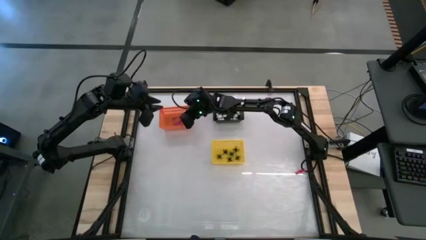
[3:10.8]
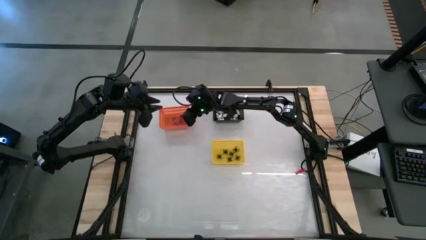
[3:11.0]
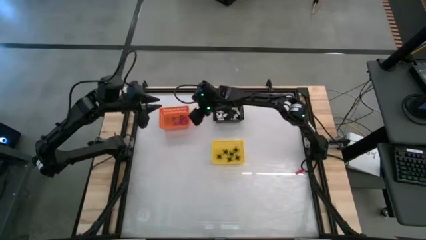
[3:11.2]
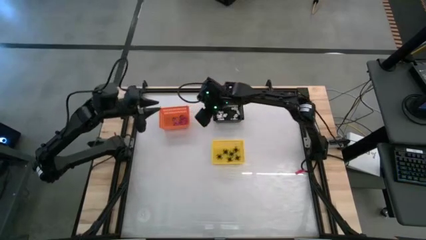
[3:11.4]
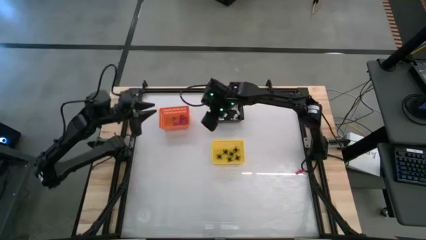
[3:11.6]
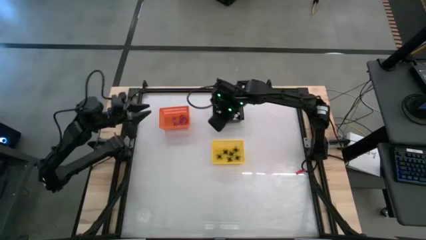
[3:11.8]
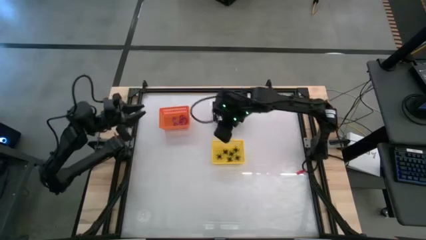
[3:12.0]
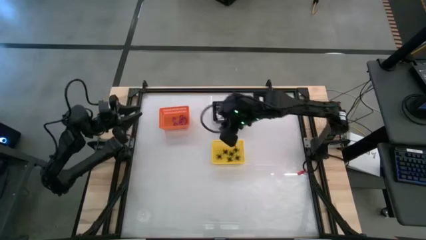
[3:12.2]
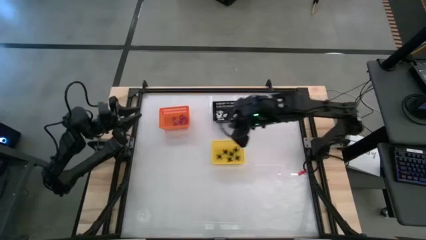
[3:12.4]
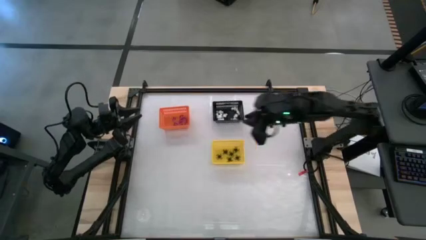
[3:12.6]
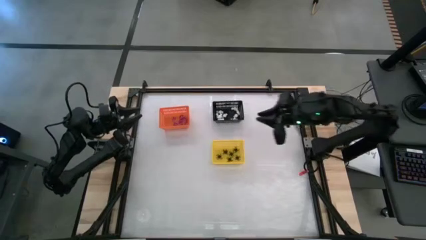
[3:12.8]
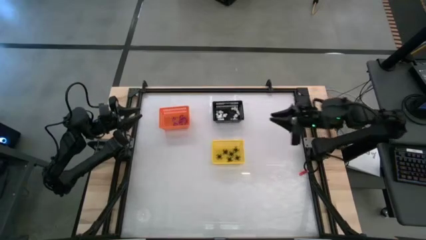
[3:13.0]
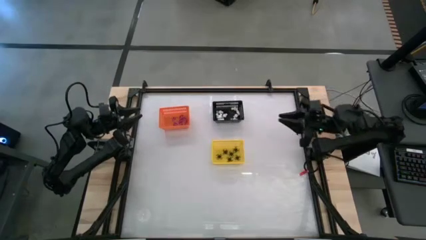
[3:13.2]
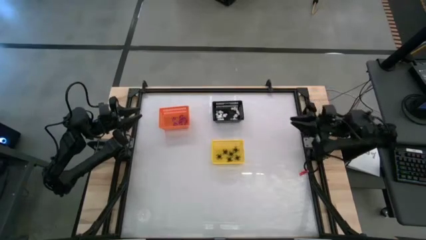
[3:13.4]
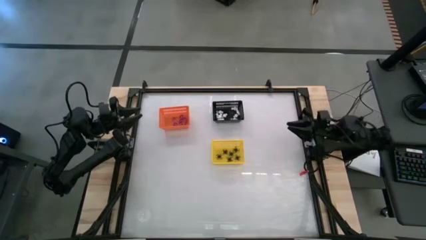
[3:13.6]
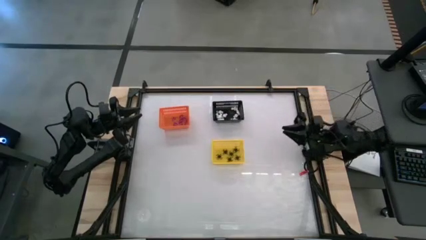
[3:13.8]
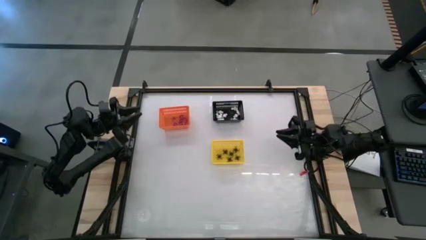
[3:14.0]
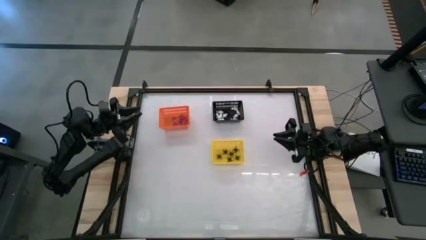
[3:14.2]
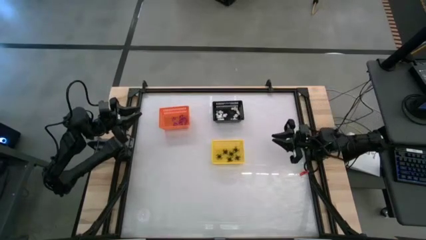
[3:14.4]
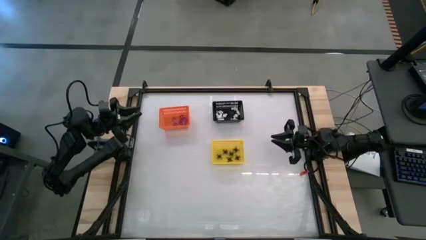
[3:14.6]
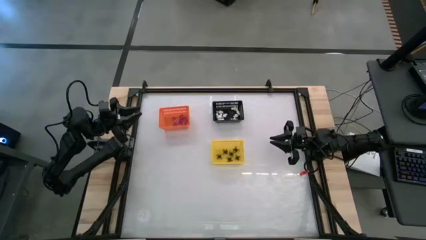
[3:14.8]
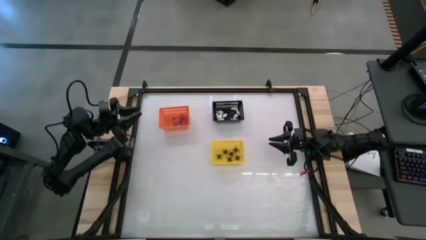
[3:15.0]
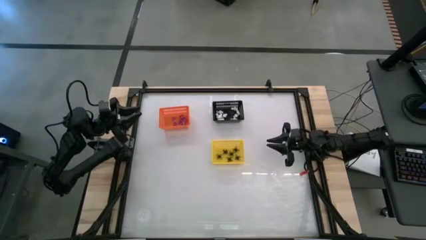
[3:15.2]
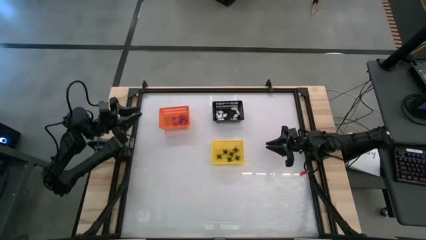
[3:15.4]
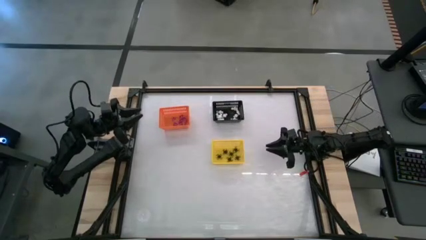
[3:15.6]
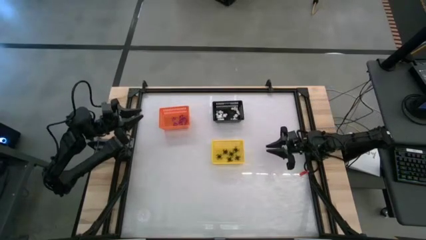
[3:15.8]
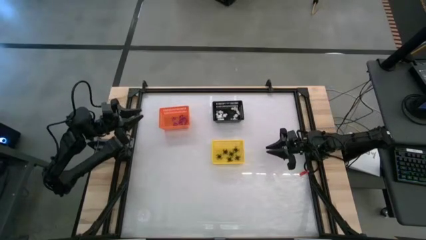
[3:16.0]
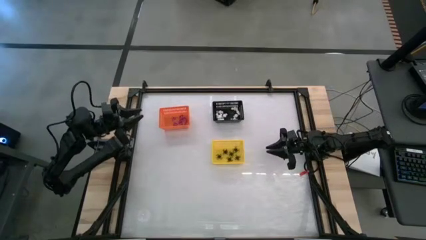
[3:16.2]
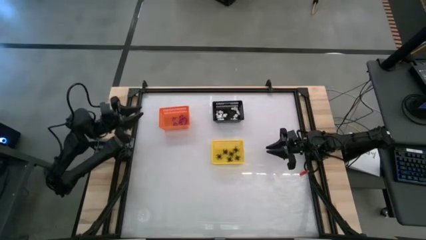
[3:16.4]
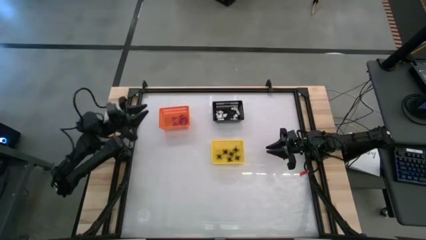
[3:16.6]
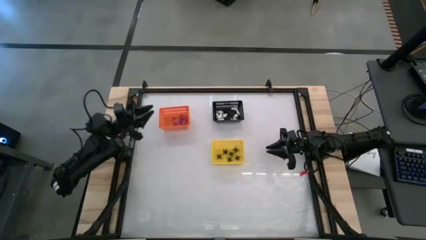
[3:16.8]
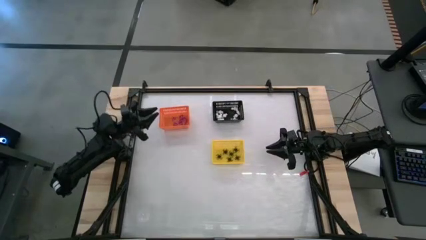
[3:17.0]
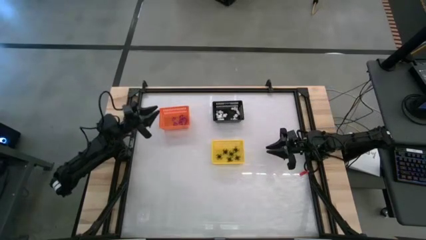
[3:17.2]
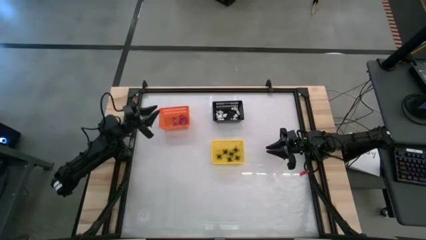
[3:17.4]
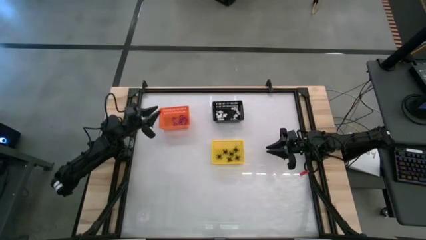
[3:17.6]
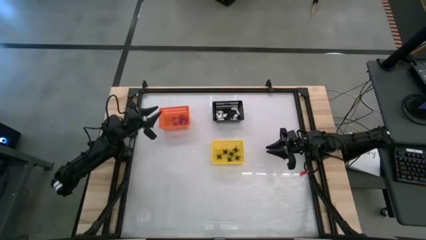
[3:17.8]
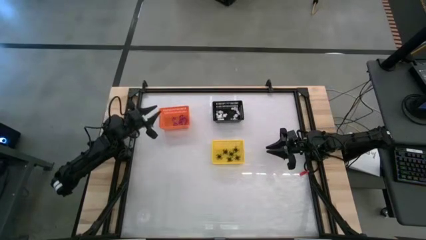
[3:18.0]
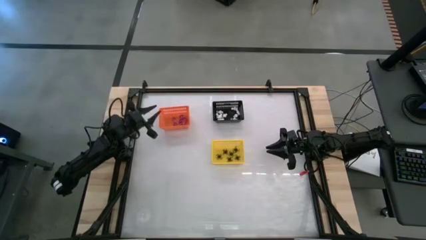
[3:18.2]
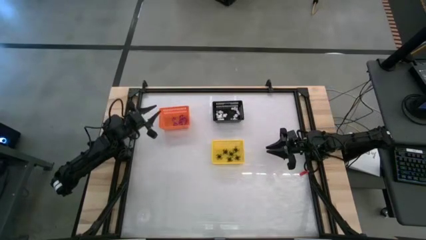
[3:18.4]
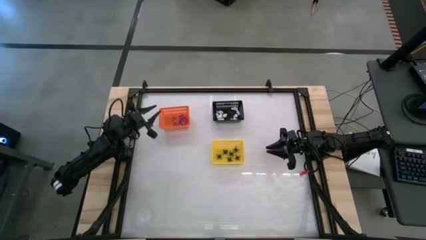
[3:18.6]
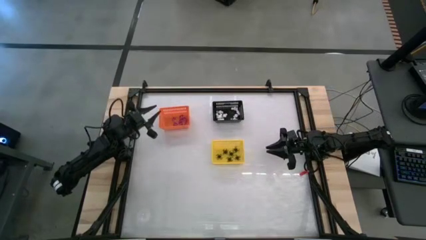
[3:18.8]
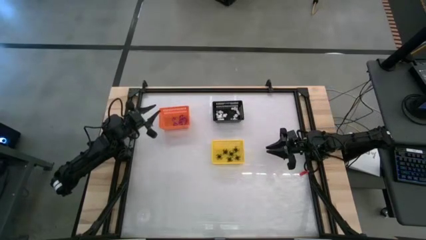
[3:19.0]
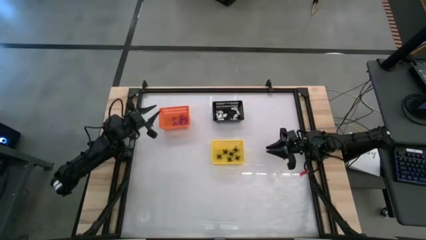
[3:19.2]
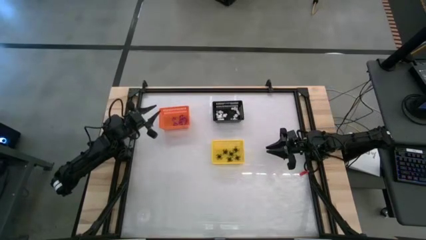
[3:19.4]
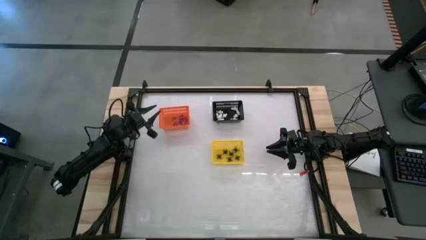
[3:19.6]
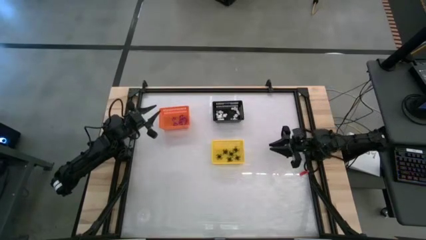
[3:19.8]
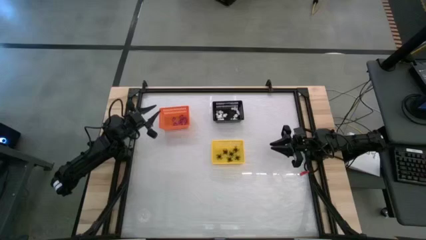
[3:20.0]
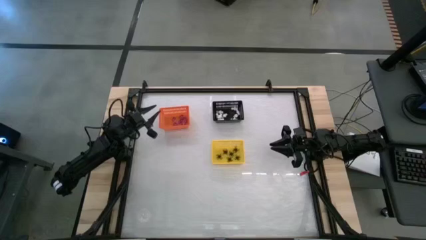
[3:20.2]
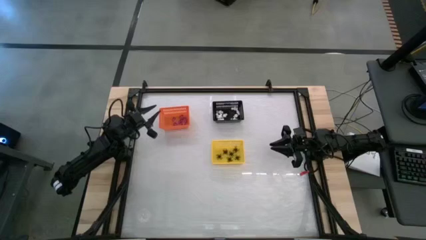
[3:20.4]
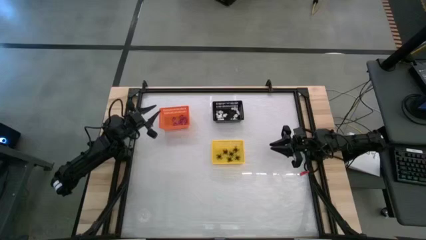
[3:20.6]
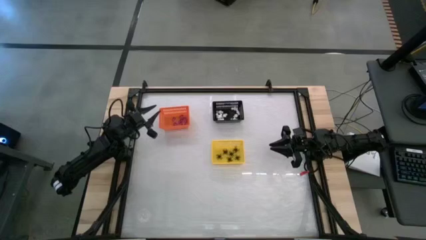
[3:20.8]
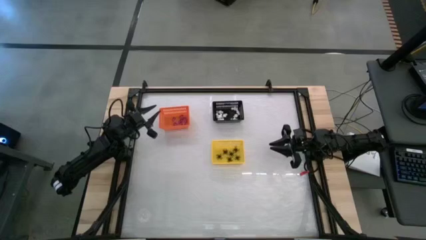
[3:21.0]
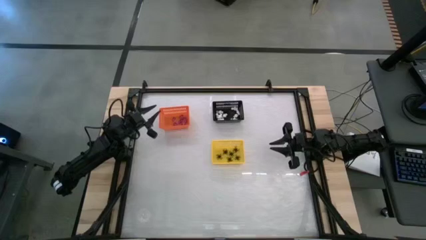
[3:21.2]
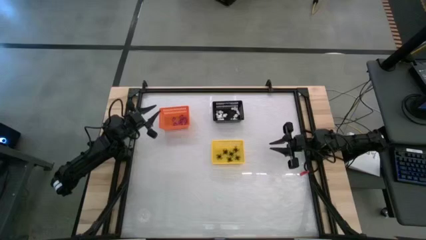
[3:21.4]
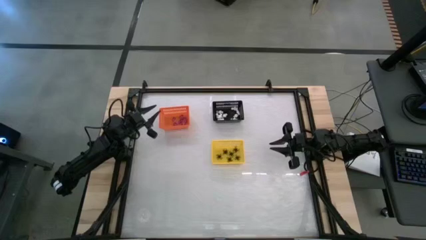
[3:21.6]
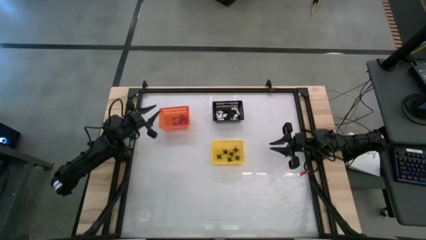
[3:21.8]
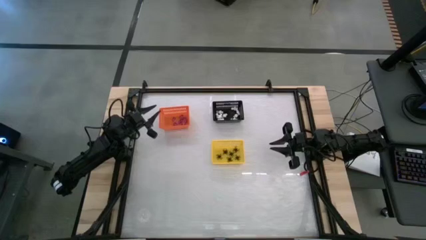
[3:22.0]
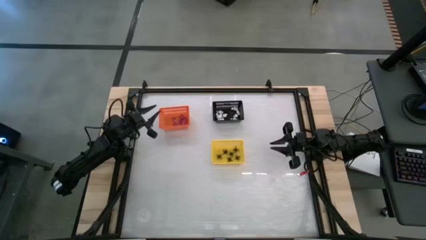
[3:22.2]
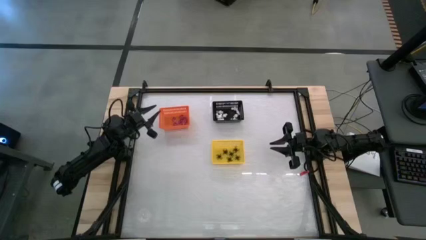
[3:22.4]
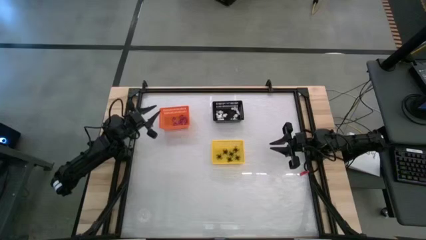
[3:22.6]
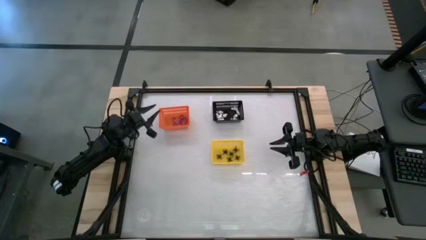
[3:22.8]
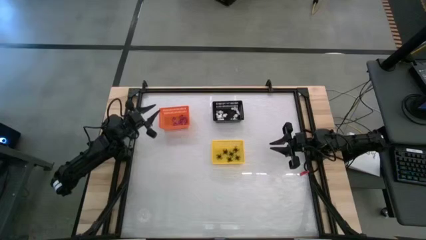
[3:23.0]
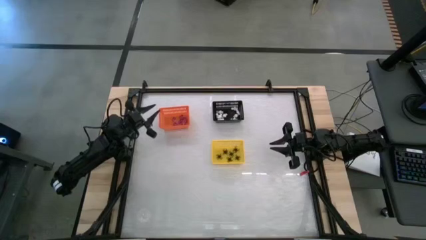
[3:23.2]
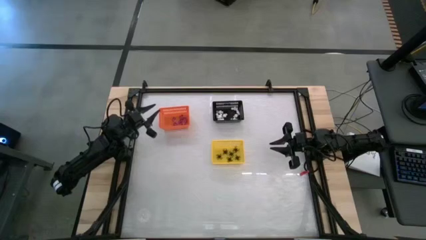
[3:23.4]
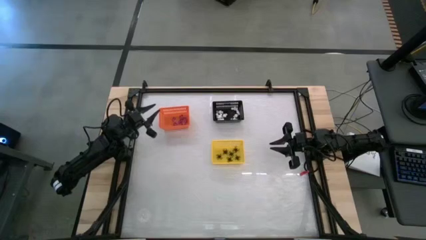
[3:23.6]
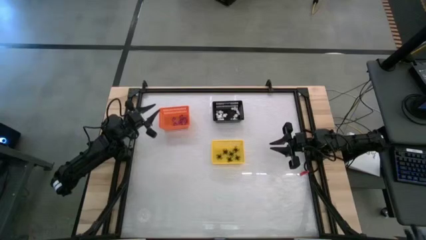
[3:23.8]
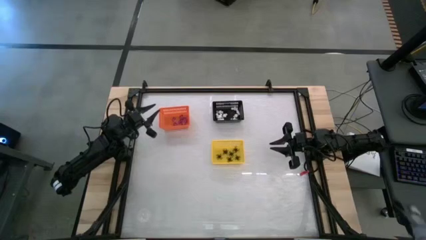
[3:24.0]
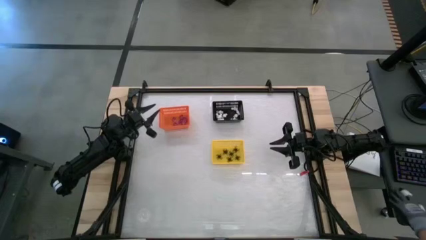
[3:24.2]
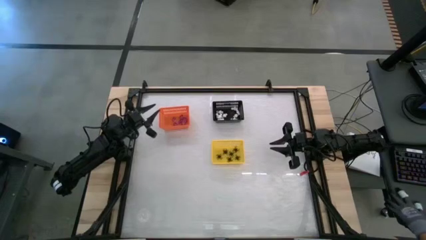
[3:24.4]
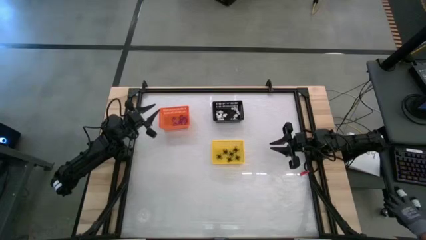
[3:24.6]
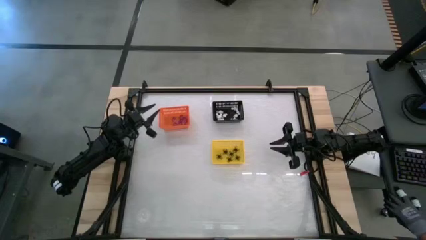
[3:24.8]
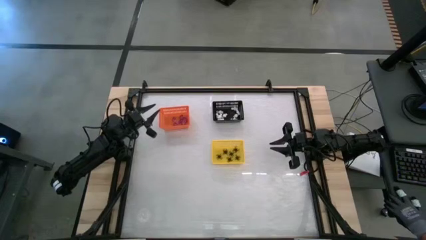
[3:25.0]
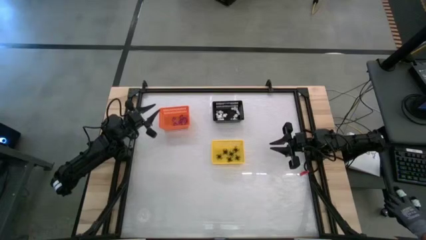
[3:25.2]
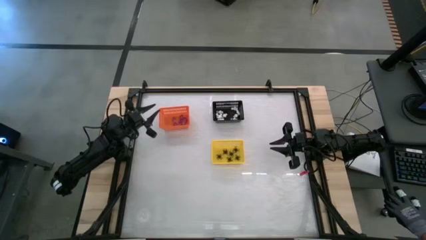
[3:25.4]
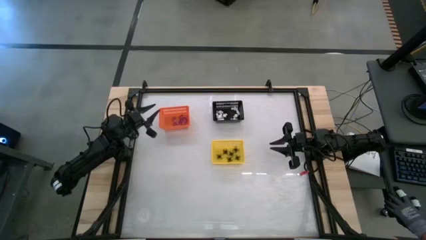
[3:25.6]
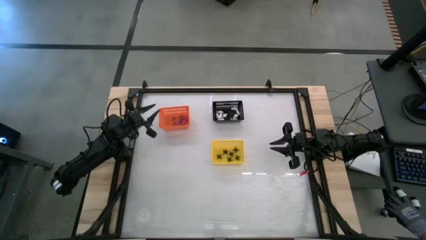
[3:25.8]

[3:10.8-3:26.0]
Task: Sort Halloween decoration
Return to Home Position

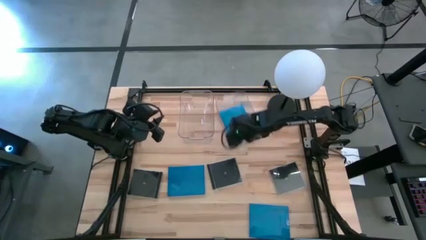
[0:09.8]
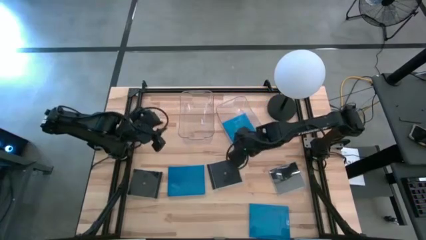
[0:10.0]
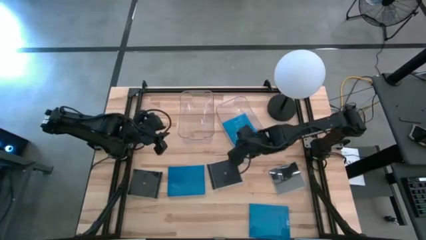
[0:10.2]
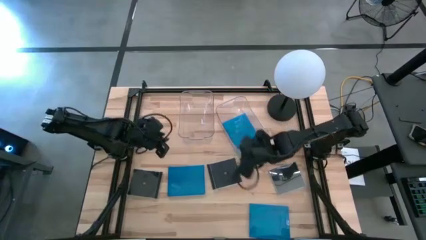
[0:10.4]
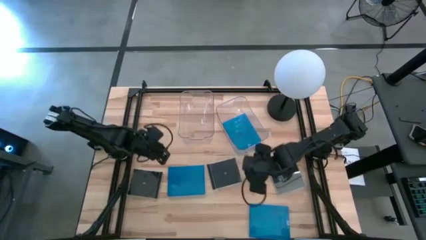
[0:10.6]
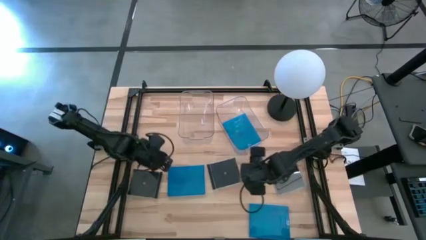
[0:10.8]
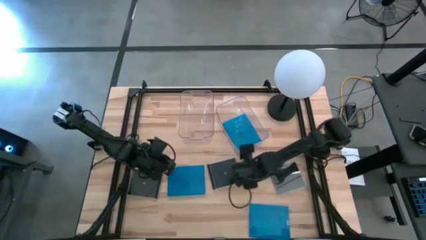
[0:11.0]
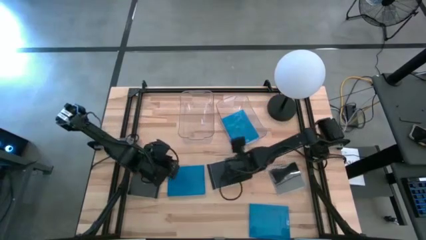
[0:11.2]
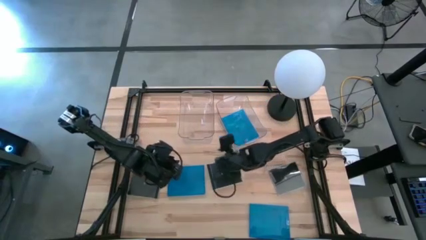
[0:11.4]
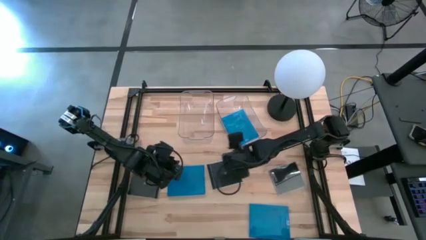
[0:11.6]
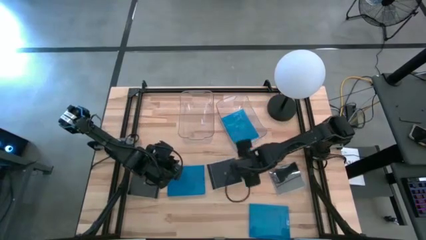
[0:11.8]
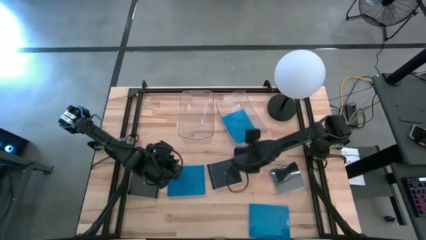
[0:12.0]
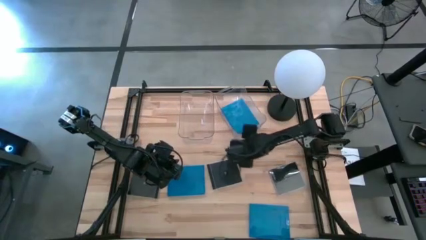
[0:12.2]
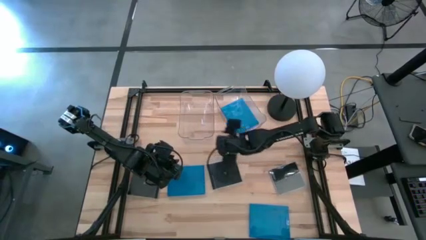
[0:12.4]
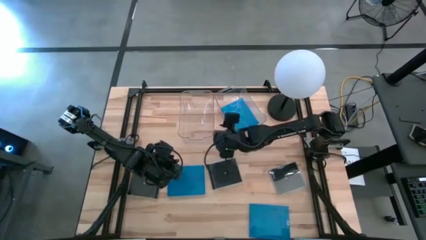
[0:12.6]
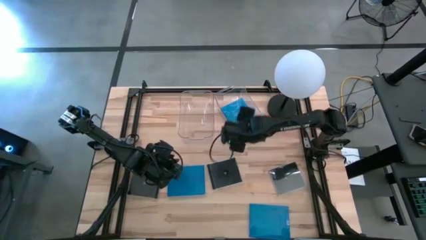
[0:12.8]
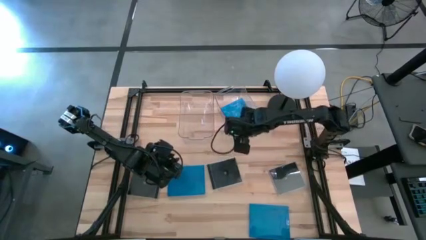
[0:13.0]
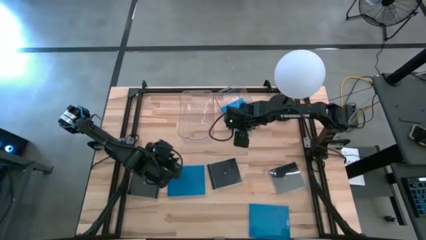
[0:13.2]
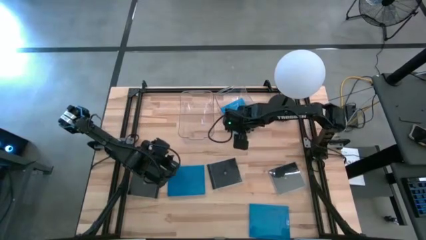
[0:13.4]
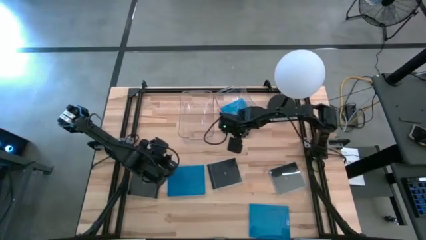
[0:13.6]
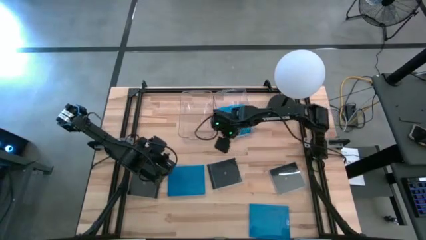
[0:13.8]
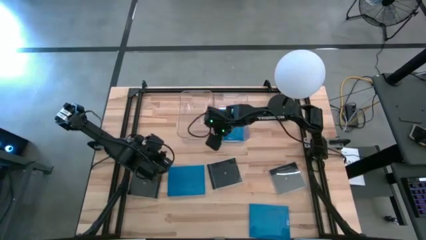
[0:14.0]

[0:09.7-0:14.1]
Task: Pick & place jewel cases by type
Adjust the right transparent bin
